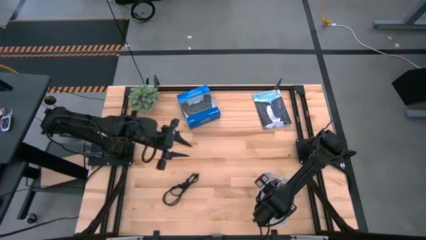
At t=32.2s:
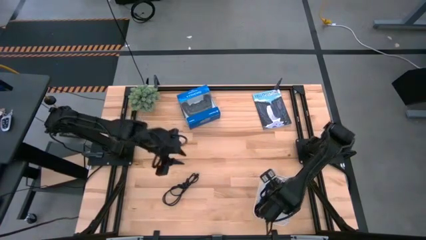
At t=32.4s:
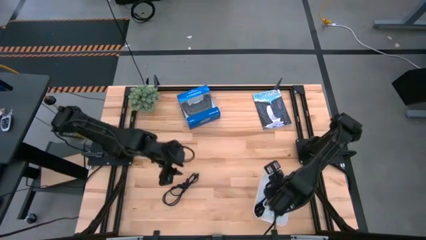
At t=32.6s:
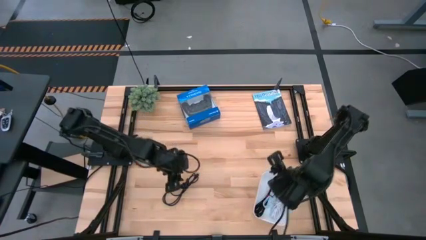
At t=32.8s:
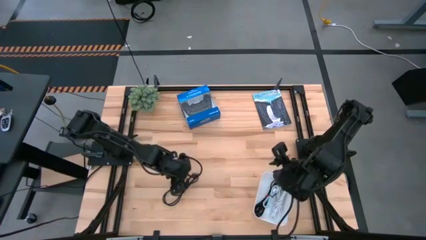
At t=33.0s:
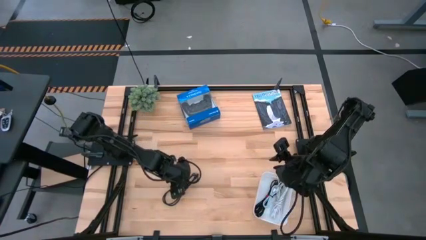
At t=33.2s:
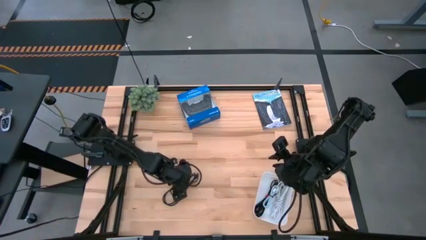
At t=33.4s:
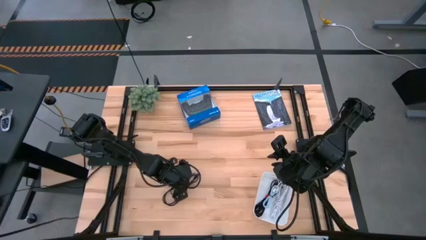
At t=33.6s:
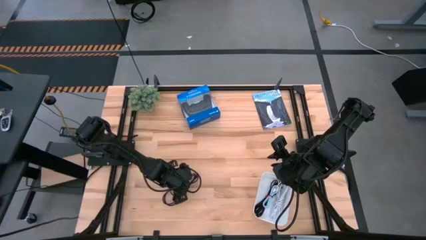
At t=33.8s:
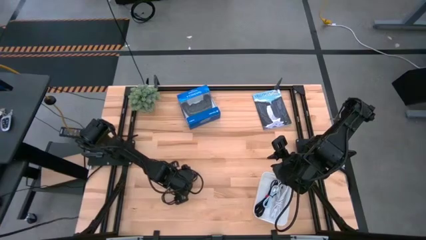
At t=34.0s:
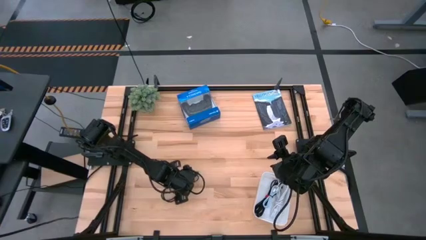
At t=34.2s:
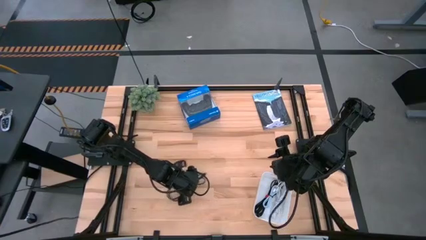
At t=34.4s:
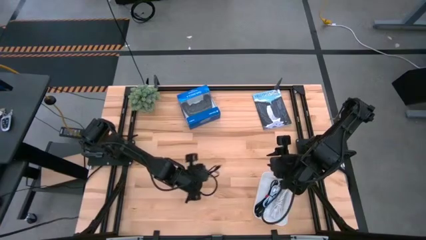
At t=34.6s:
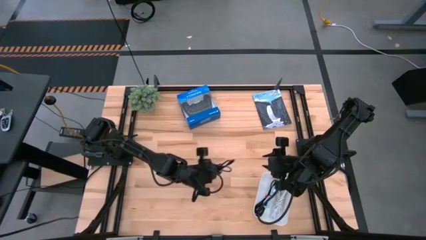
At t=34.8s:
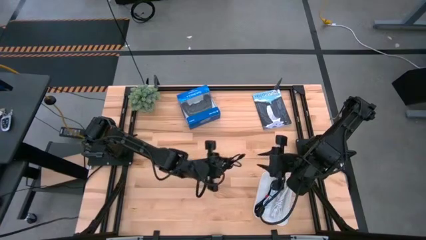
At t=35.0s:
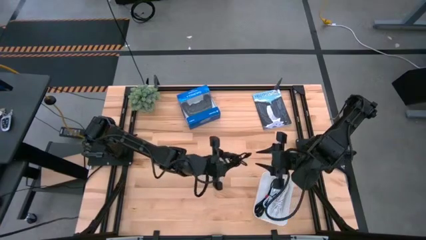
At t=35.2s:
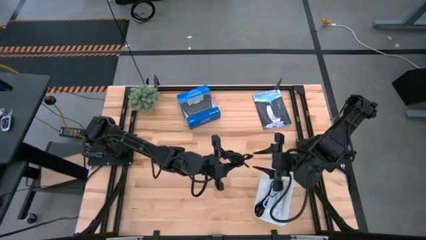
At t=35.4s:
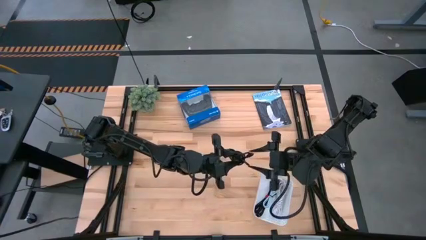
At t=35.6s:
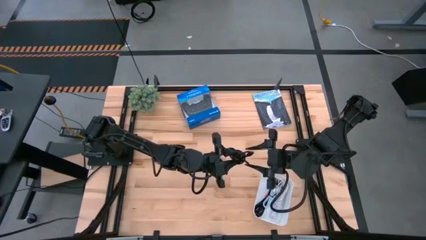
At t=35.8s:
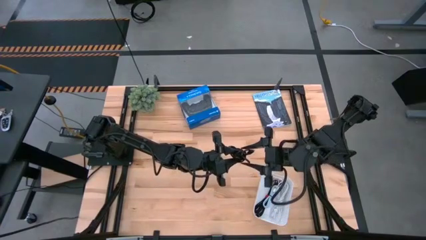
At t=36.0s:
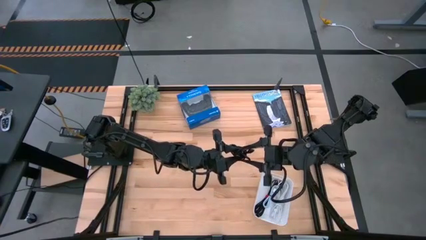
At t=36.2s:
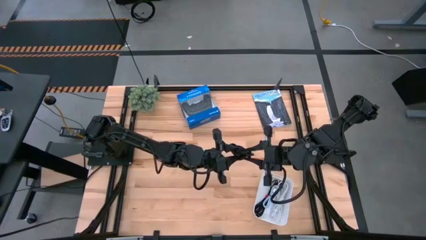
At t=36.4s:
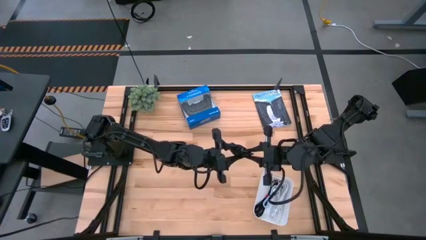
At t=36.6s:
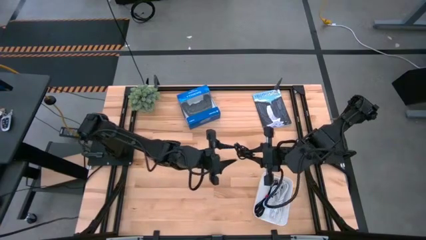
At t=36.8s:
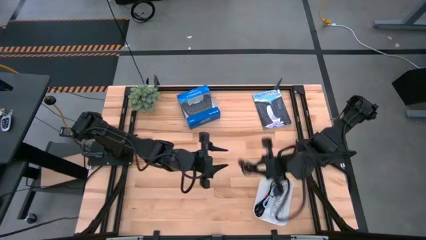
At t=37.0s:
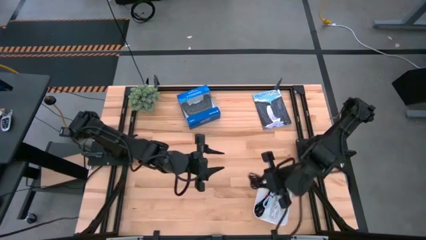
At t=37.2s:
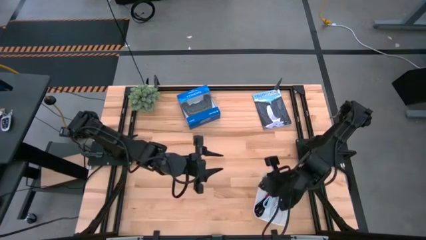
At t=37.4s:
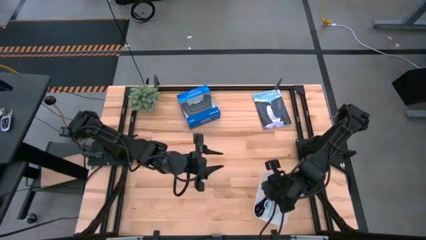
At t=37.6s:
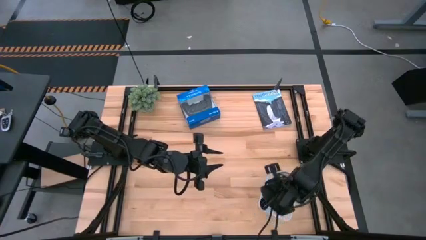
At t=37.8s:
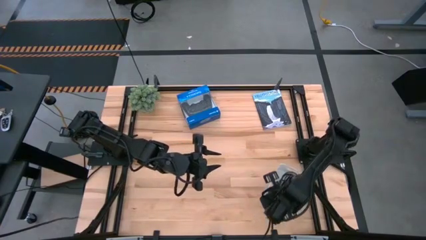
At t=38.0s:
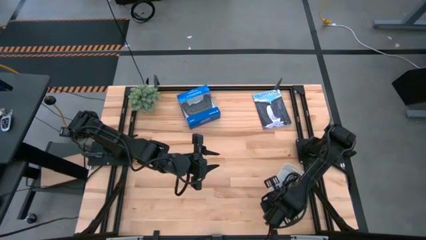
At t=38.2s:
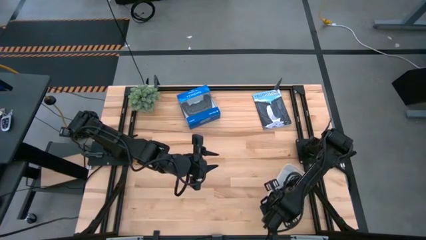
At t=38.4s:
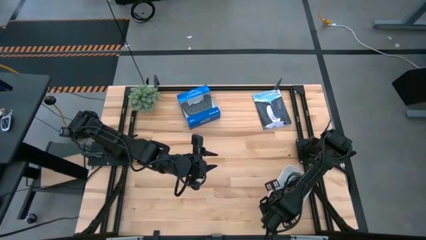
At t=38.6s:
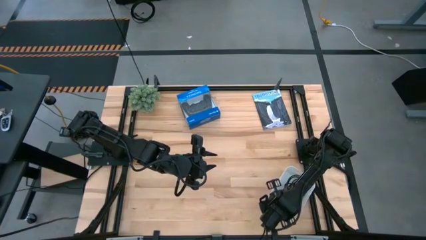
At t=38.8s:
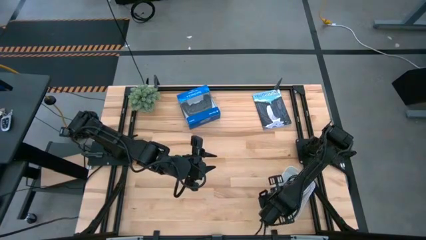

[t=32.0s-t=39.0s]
Task: Pick and place USB-C Cables
Put the black charger cable into the white bin

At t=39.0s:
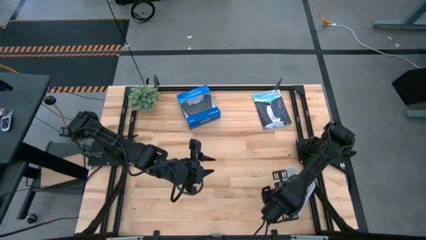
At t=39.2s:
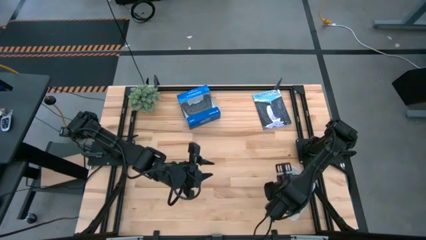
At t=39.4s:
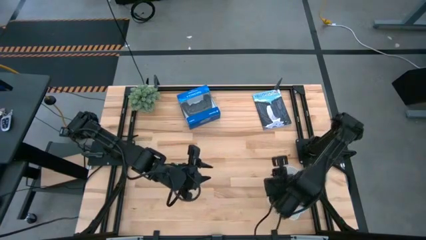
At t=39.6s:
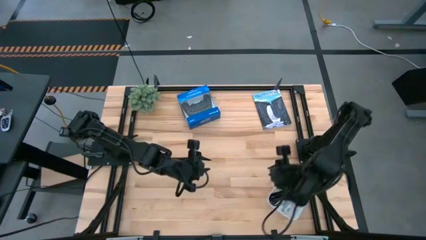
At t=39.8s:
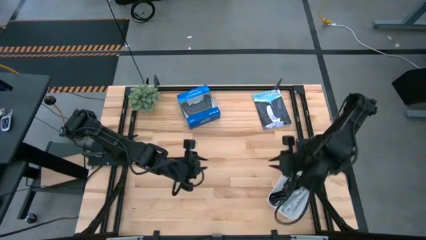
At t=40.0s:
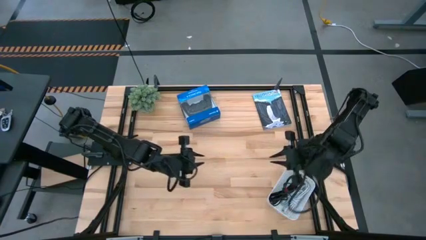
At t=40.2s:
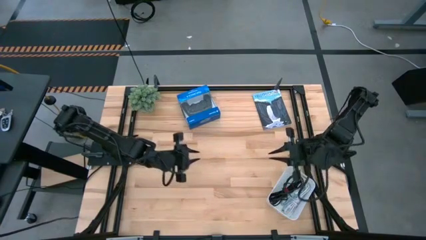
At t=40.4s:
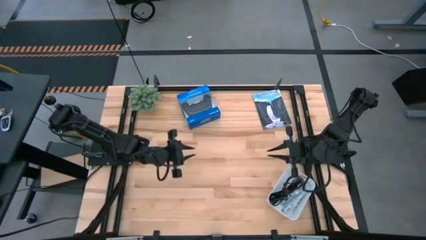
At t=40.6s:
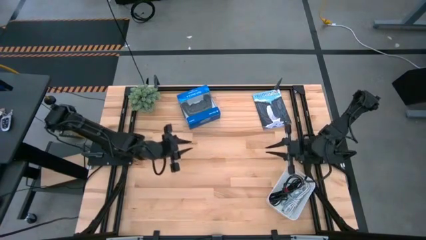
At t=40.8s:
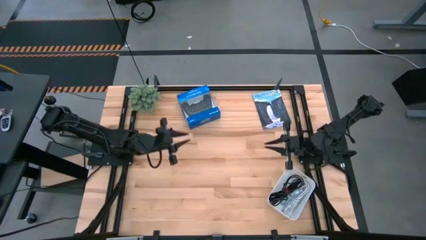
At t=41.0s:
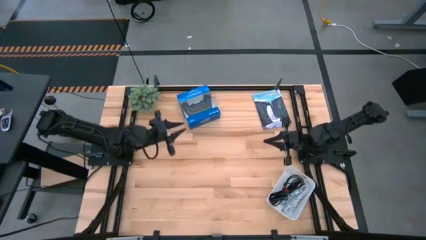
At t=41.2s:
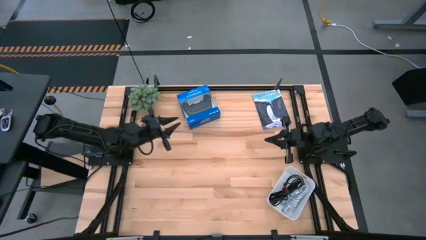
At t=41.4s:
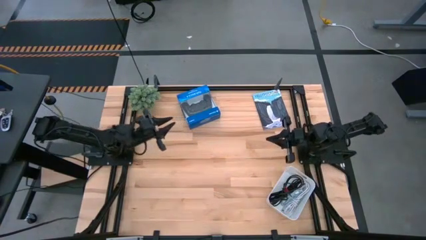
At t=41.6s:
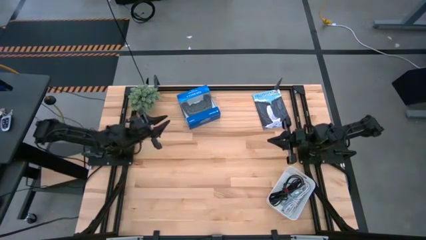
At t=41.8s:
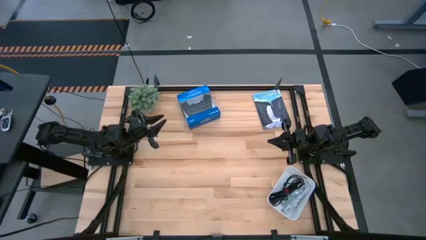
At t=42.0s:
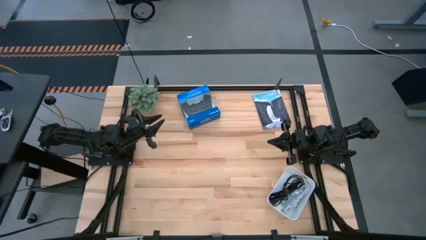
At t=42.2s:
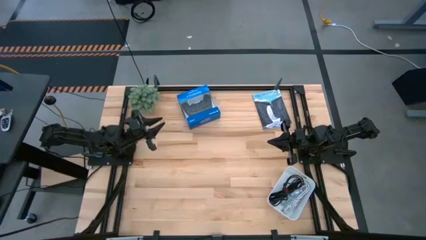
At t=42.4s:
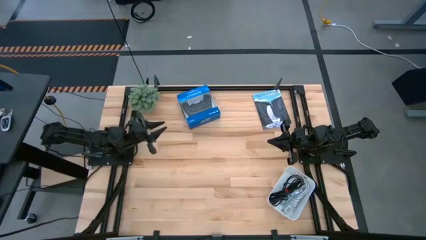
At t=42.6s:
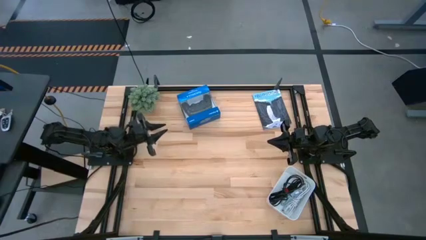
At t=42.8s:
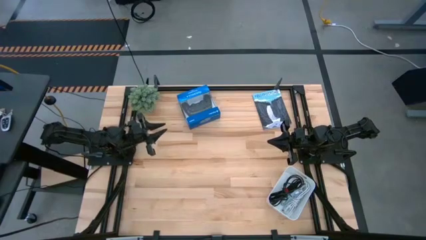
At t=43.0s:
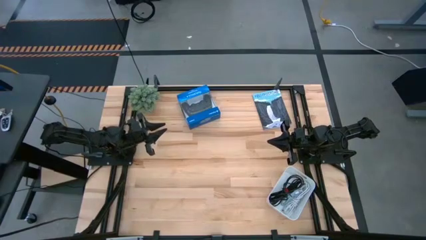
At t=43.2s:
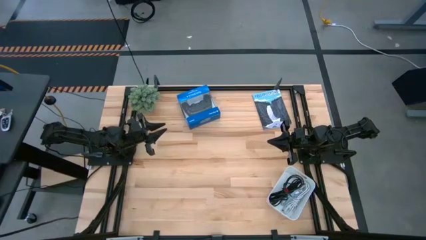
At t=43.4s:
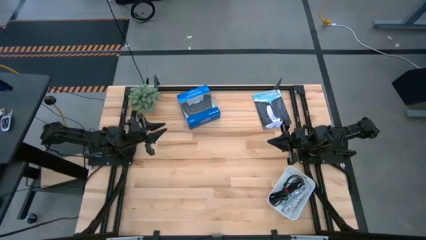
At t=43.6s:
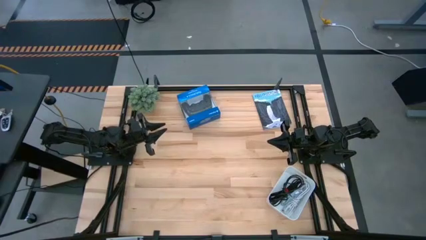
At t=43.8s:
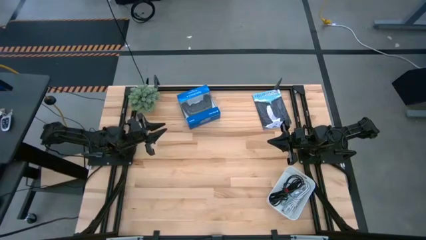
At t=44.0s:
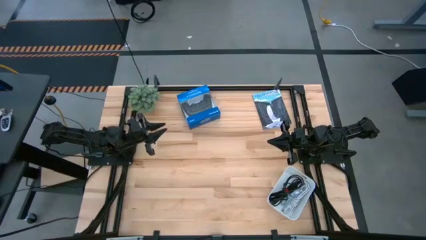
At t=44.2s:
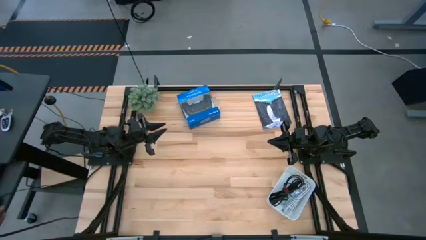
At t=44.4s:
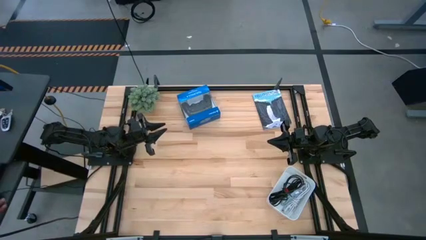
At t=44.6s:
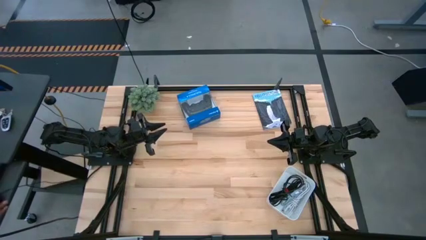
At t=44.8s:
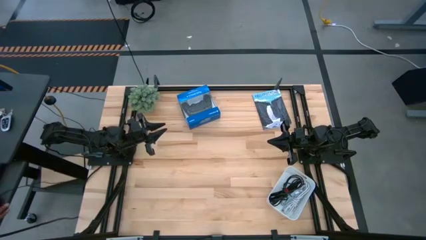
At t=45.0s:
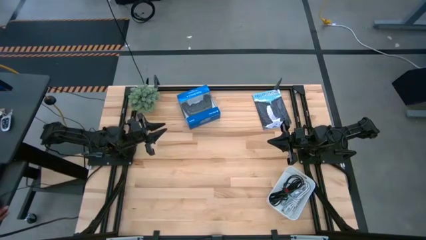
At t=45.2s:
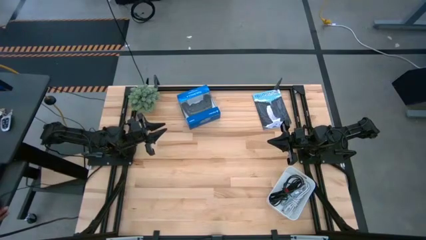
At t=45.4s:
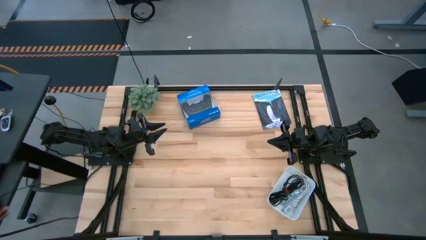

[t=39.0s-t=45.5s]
Return to Home Position
